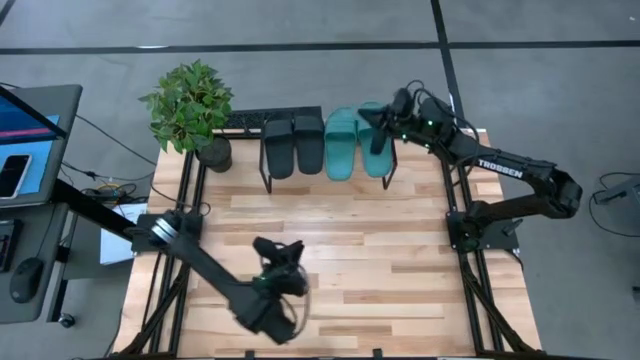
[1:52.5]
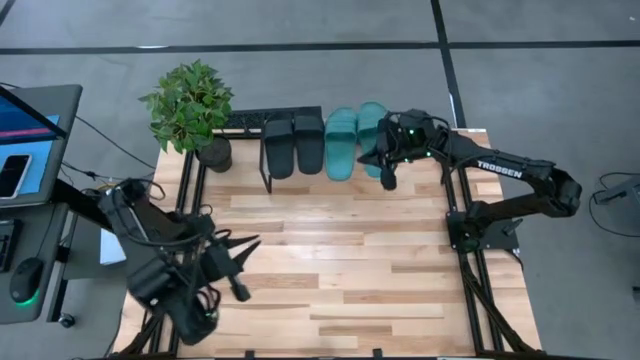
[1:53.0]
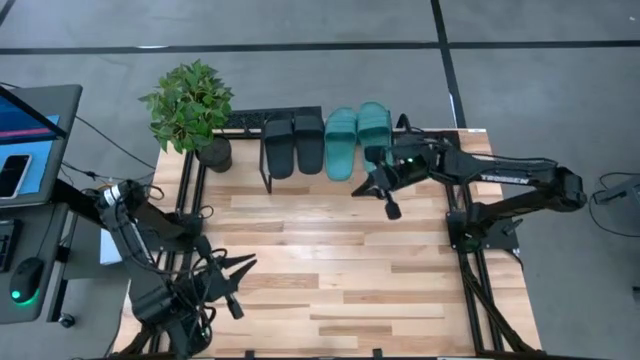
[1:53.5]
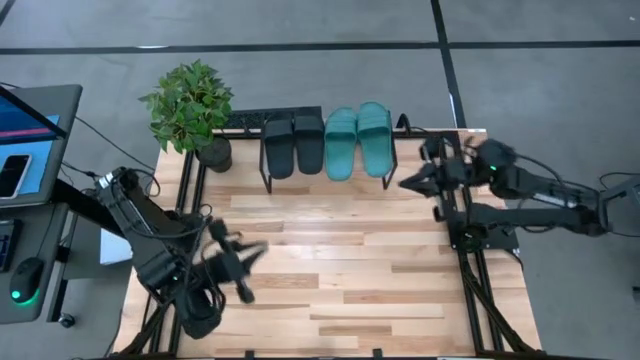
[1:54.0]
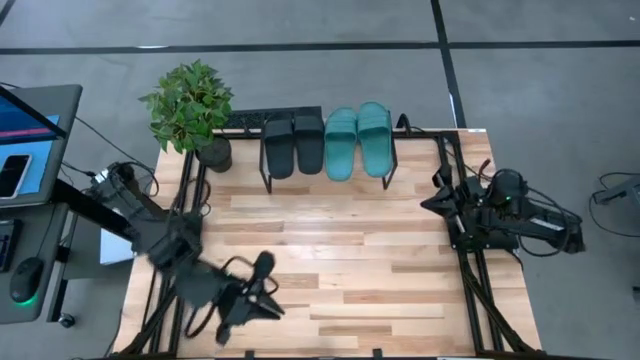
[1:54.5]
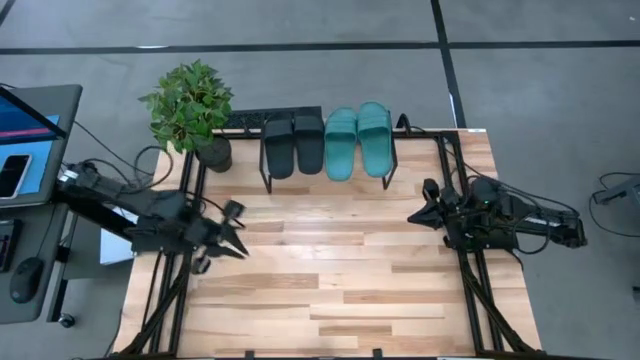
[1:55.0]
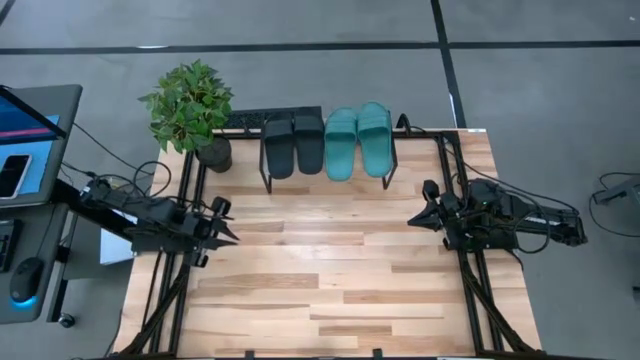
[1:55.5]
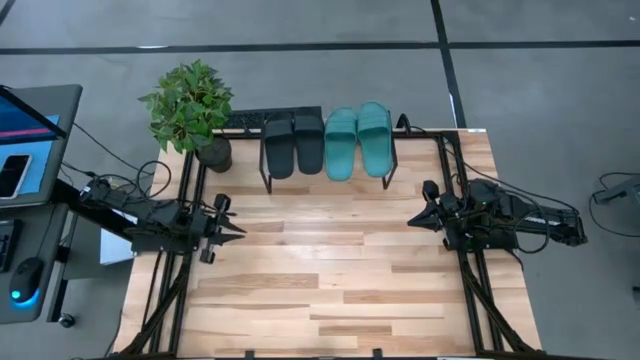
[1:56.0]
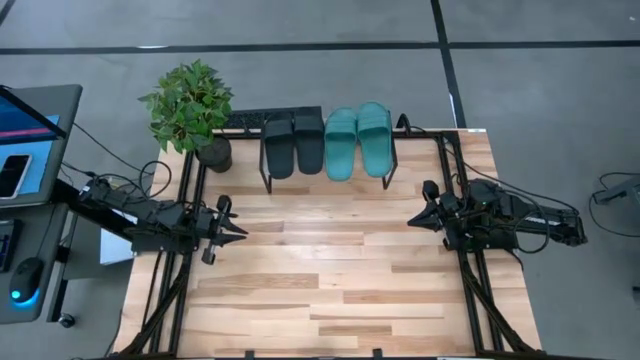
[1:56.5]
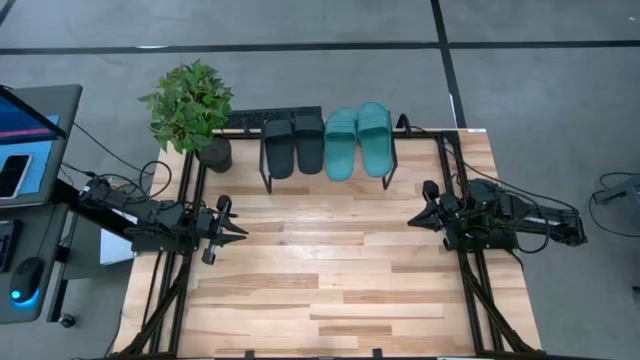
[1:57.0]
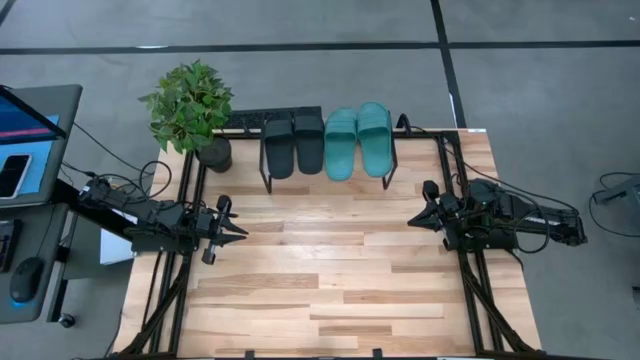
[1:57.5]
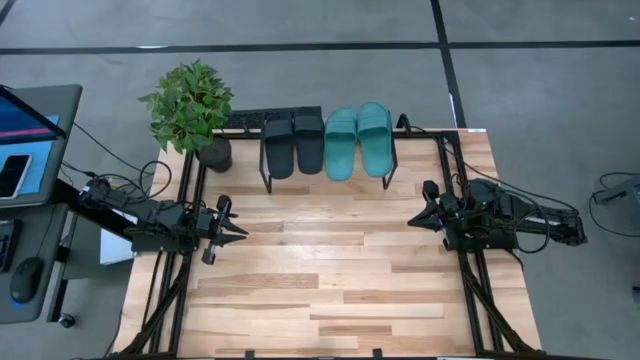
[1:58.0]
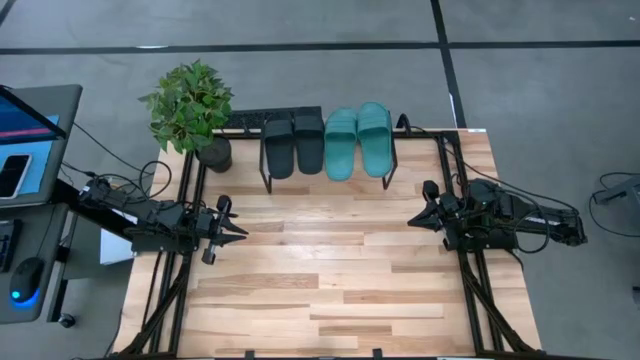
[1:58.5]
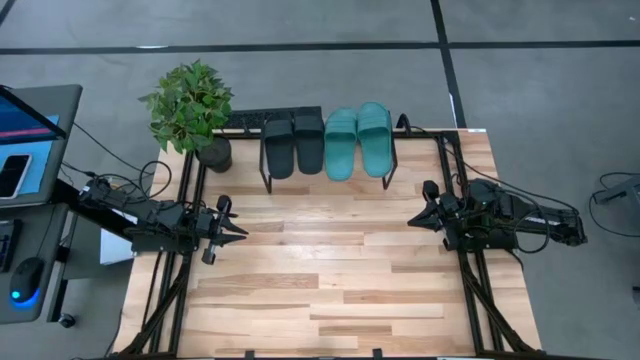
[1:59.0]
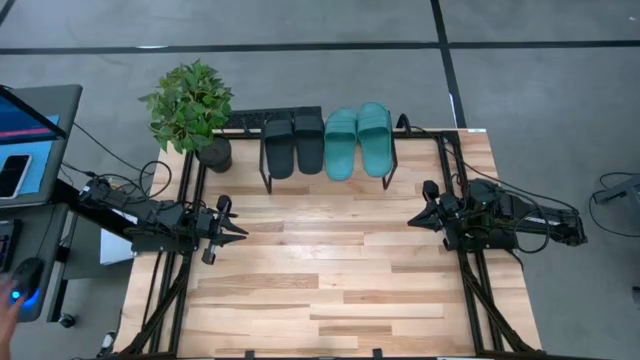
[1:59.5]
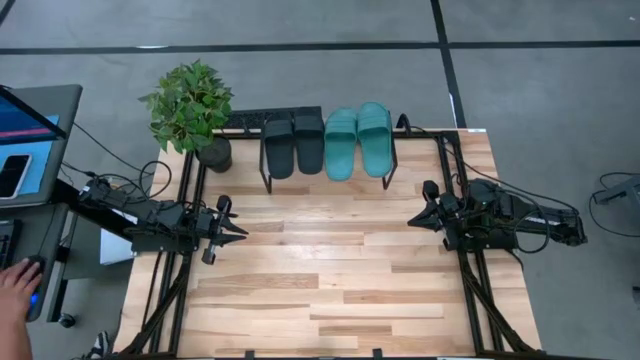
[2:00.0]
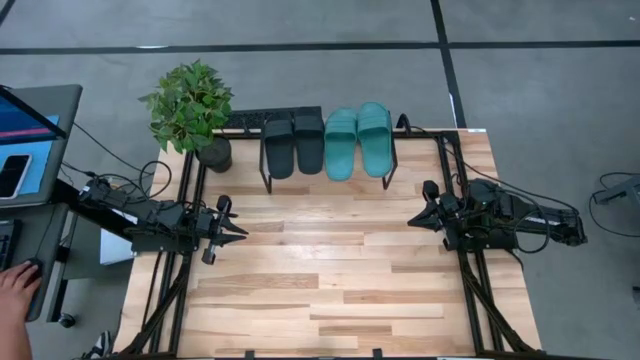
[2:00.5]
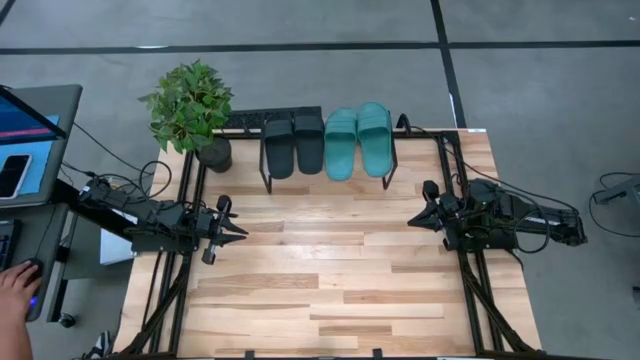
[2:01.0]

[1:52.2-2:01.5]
Task: Pick and place slides into the shelf
Return to Home Position

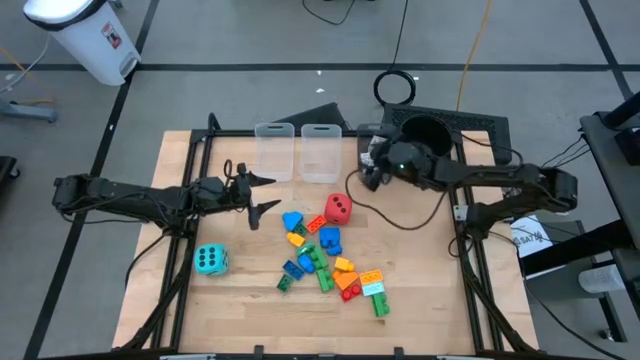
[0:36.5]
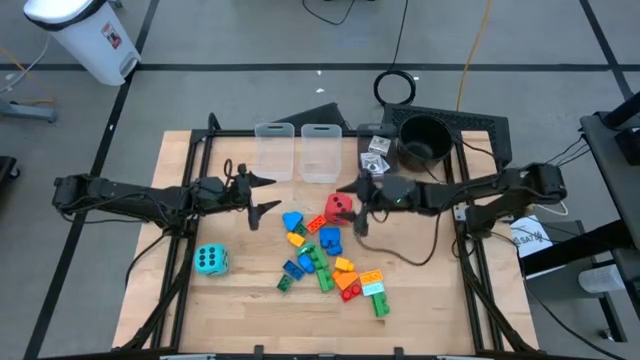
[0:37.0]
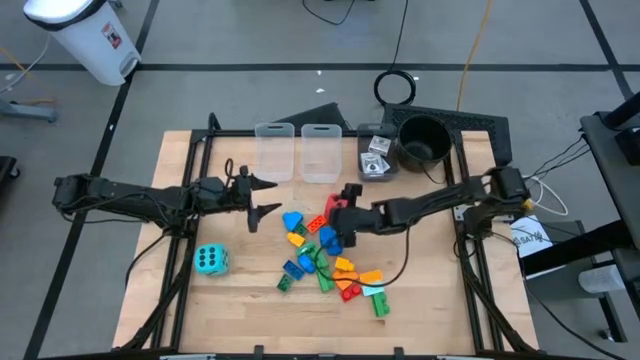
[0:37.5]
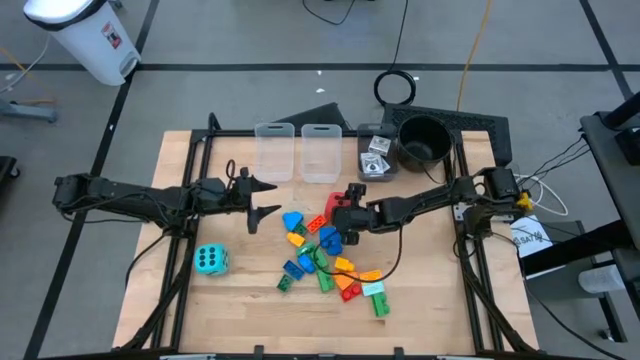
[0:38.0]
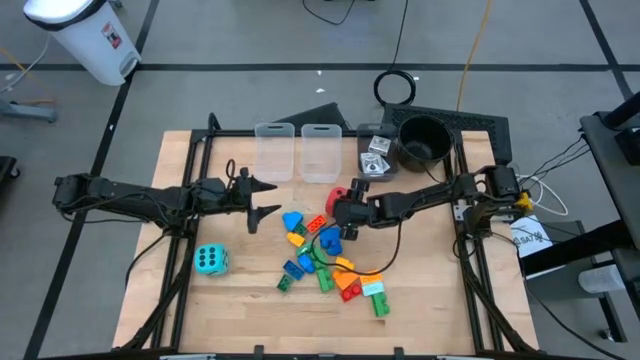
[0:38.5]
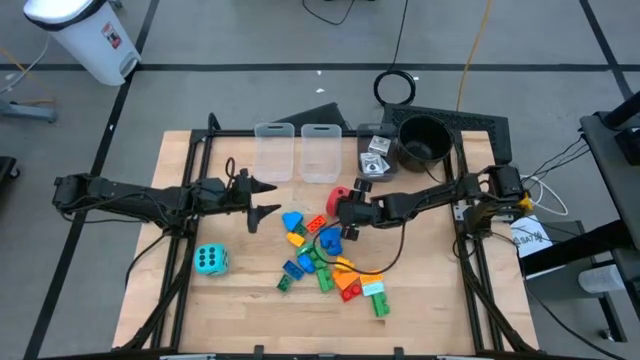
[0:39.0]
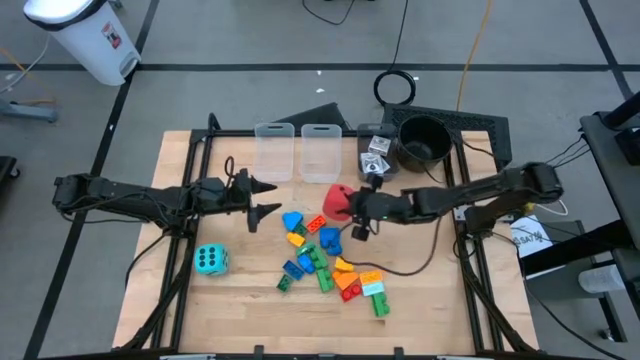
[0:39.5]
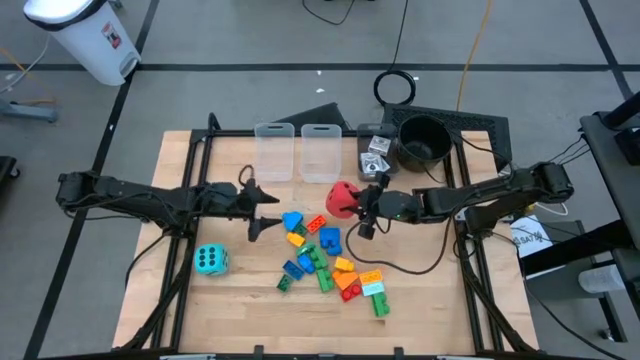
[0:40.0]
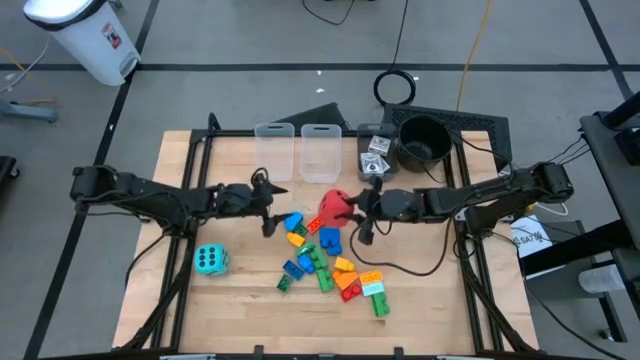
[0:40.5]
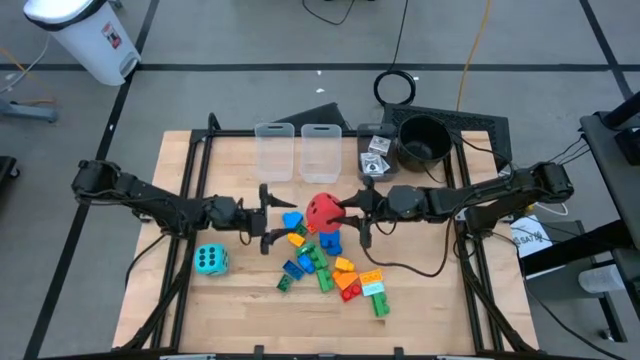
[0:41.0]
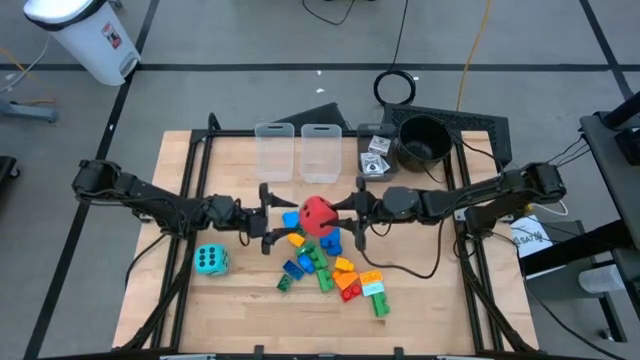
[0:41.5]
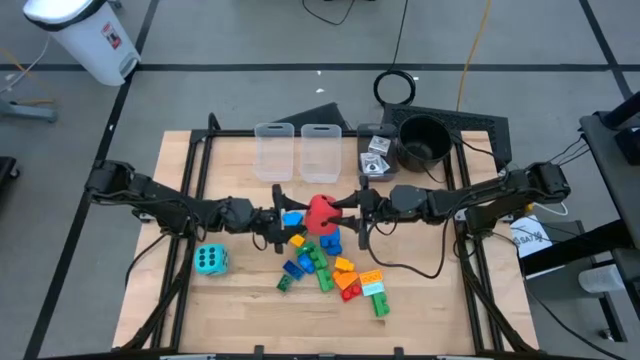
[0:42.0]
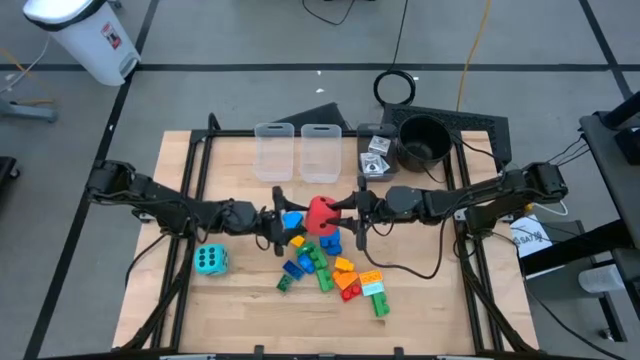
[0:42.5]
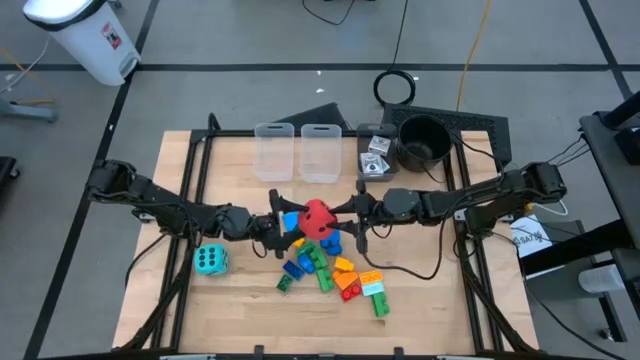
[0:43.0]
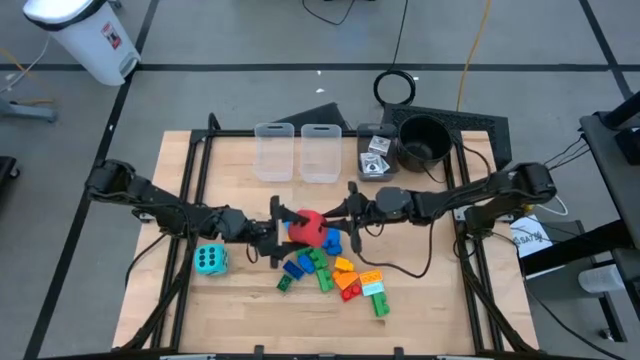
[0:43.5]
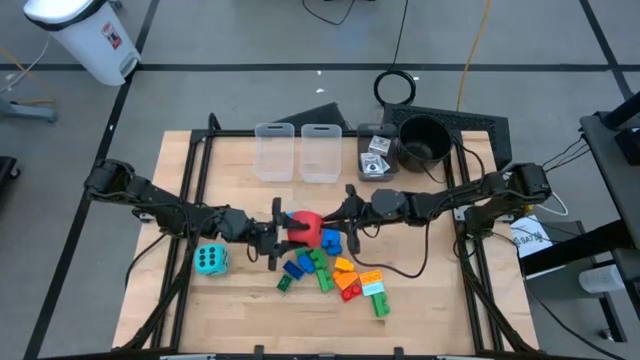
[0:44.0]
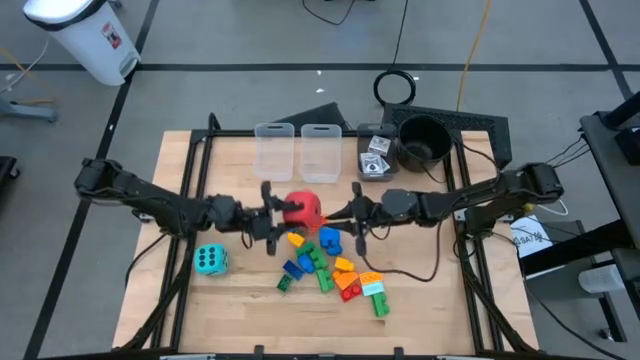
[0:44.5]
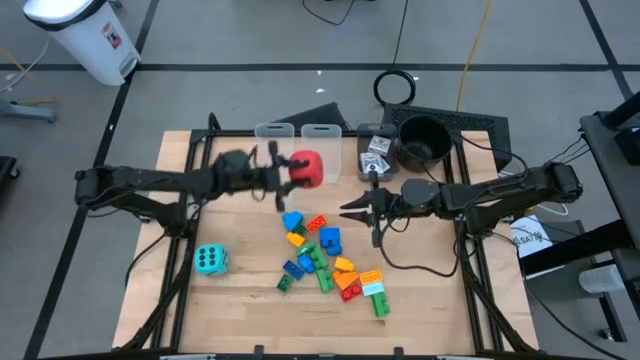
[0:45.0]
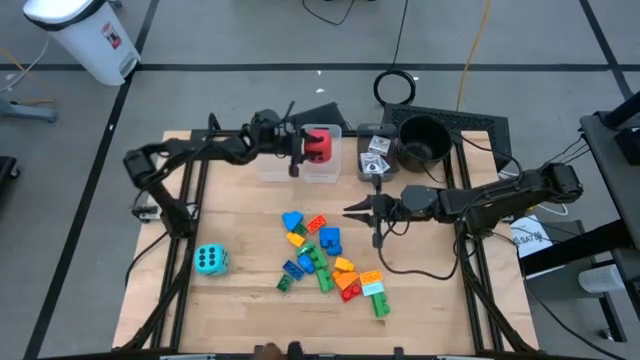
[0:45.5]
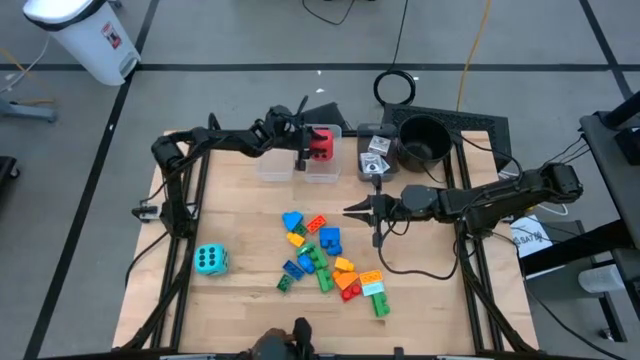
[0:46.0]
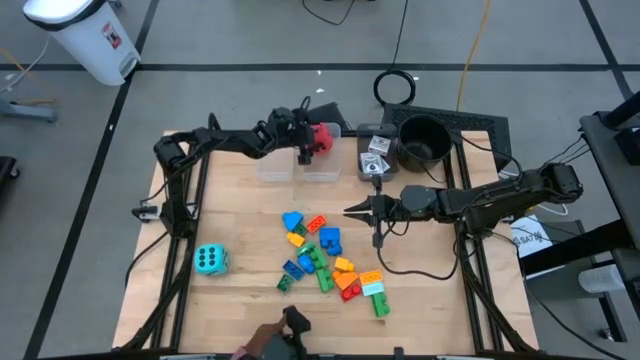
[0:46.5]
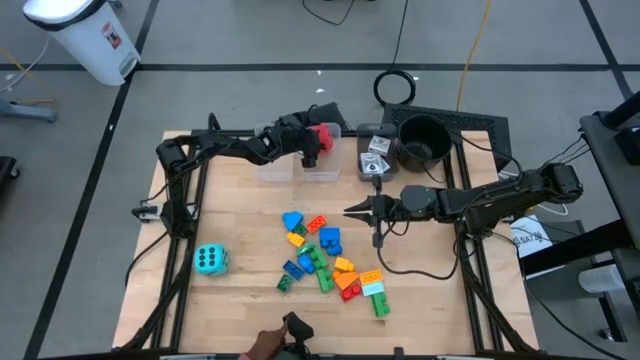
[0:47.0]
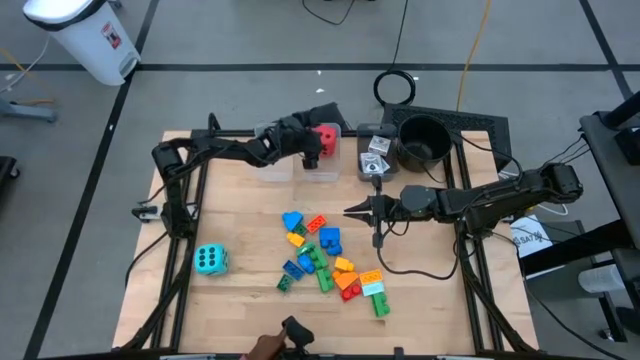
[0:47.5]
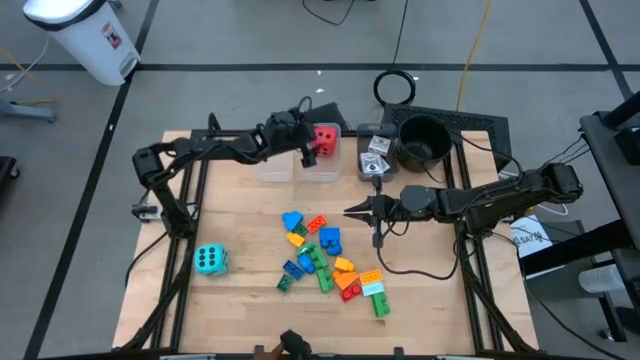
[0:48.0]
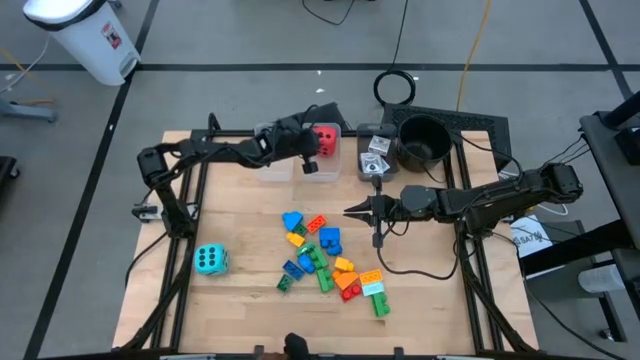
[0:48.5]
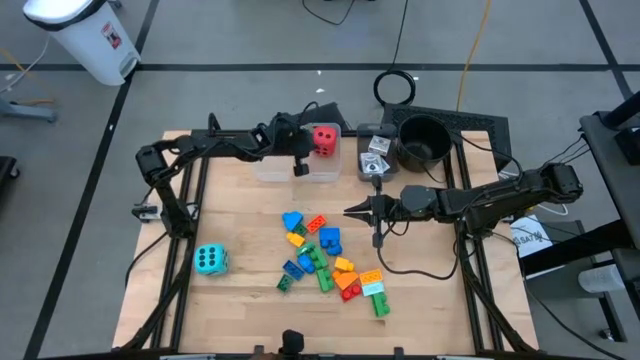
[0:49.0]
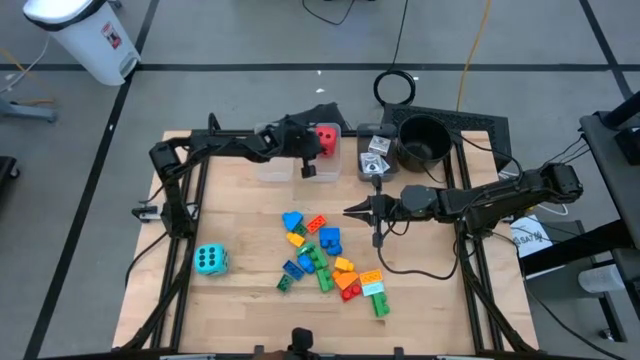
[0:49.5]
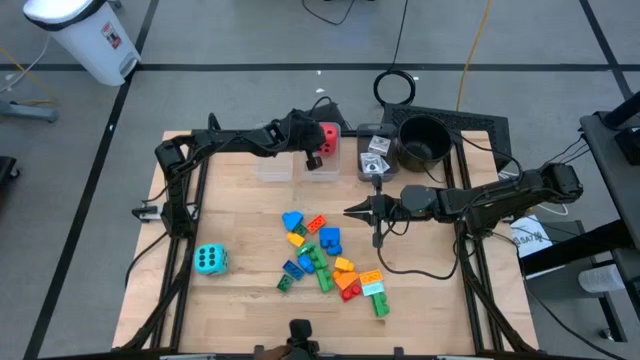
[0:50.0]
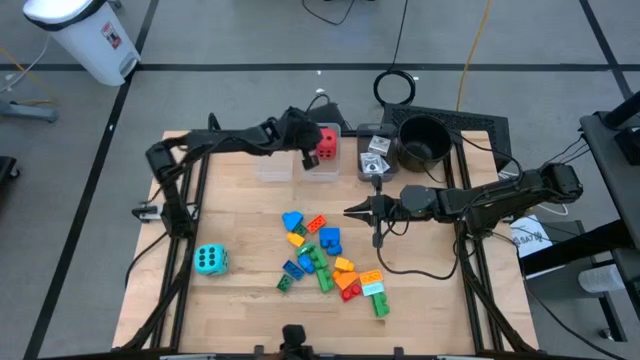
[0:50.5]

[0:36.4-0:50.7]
Task: Pick & Place Toys
Put the red dice into the right transparent bin
